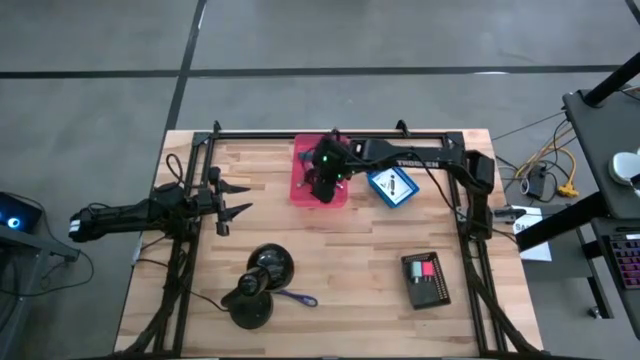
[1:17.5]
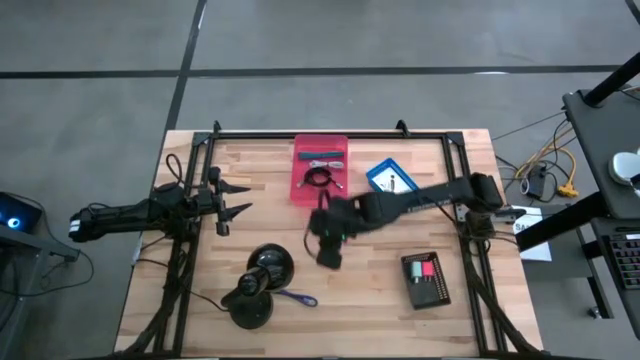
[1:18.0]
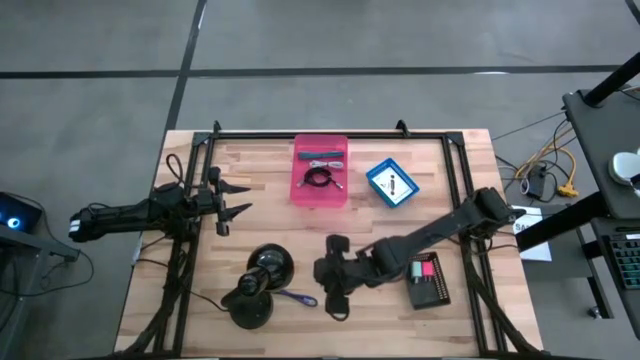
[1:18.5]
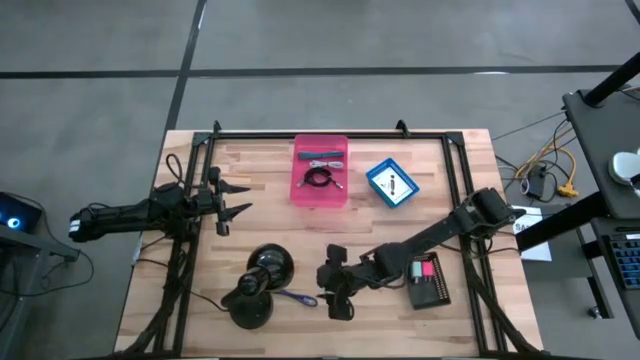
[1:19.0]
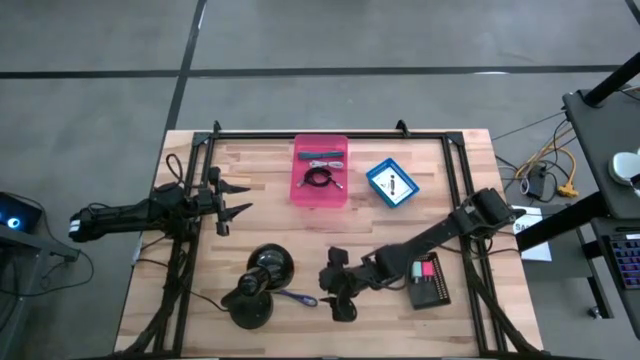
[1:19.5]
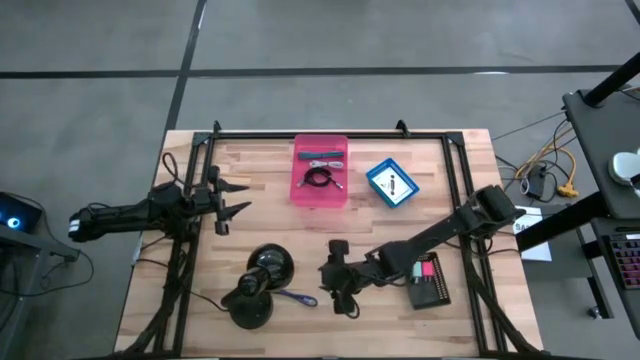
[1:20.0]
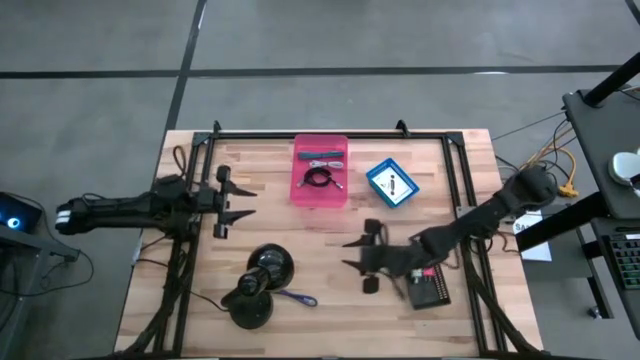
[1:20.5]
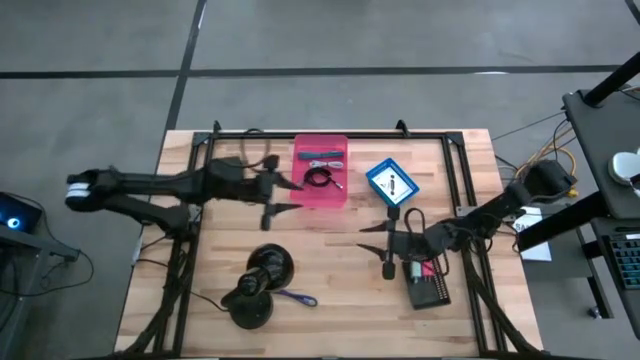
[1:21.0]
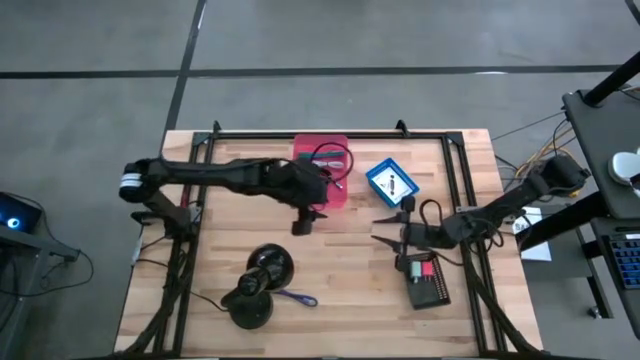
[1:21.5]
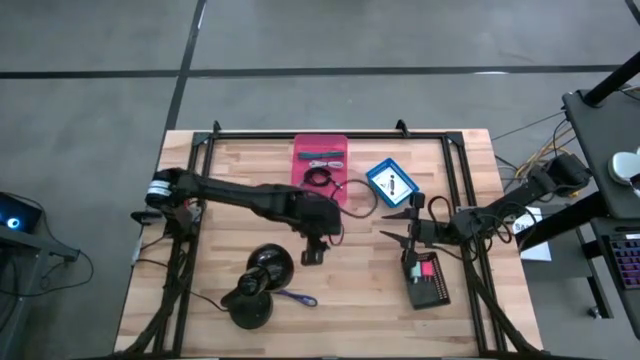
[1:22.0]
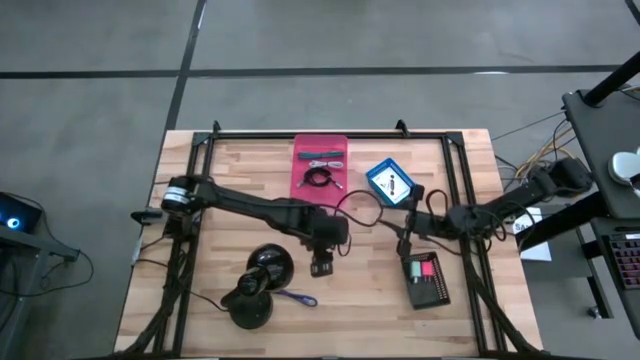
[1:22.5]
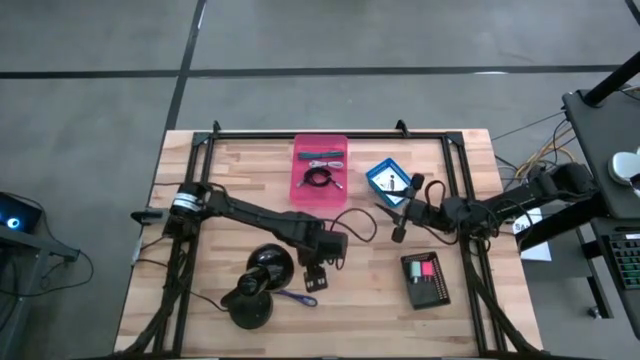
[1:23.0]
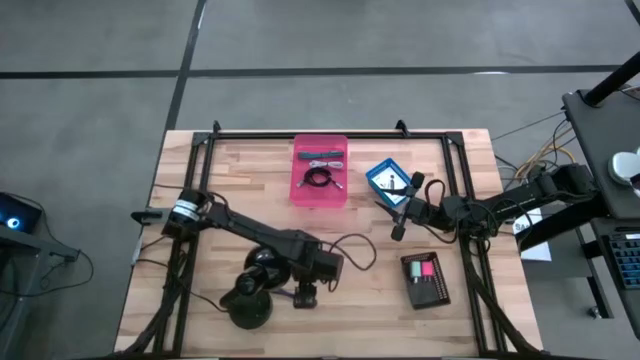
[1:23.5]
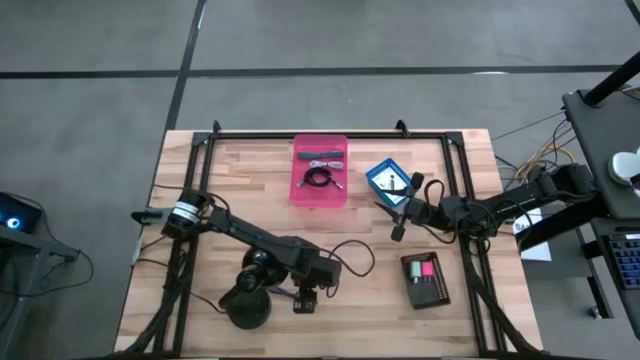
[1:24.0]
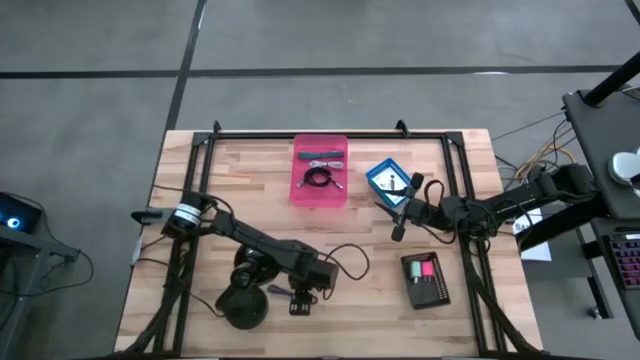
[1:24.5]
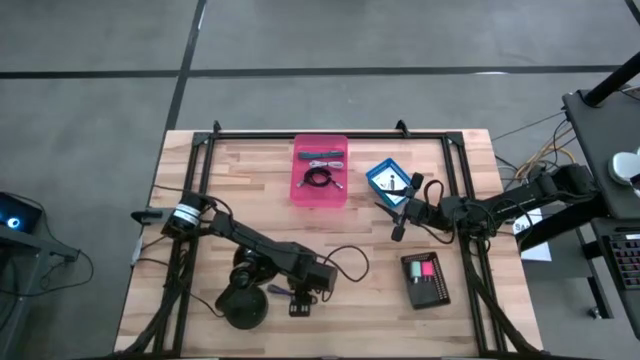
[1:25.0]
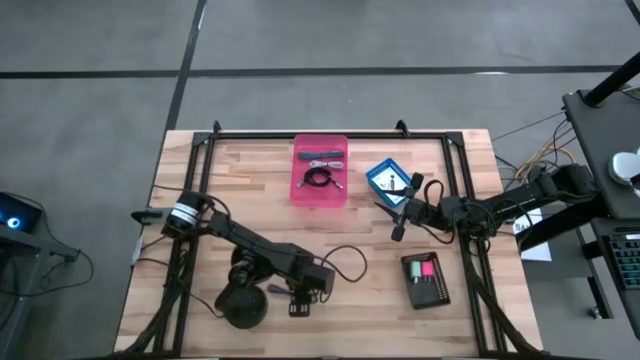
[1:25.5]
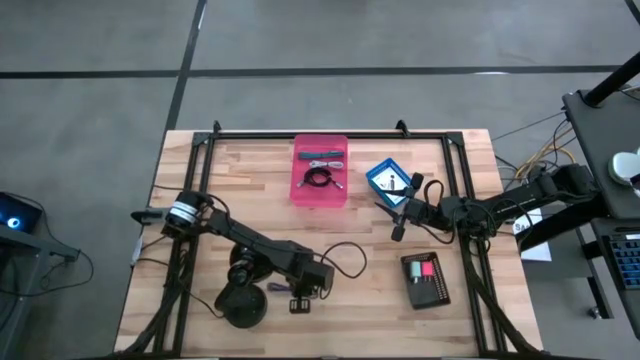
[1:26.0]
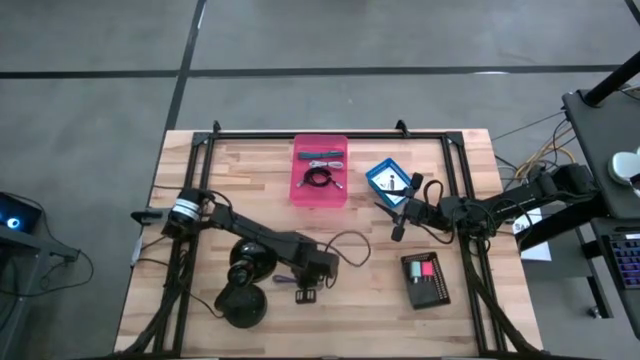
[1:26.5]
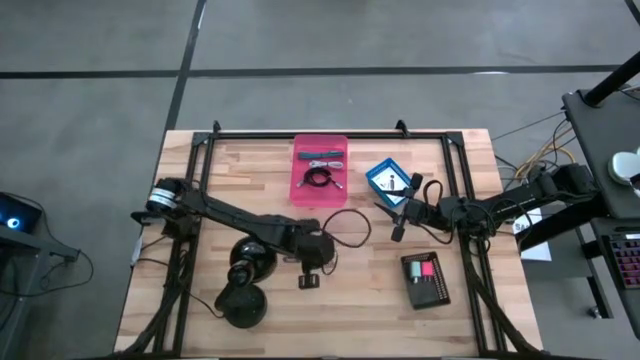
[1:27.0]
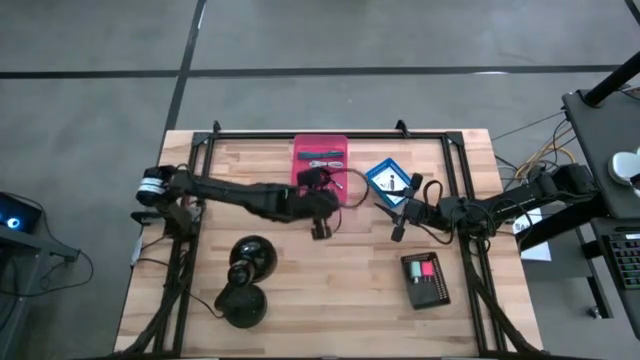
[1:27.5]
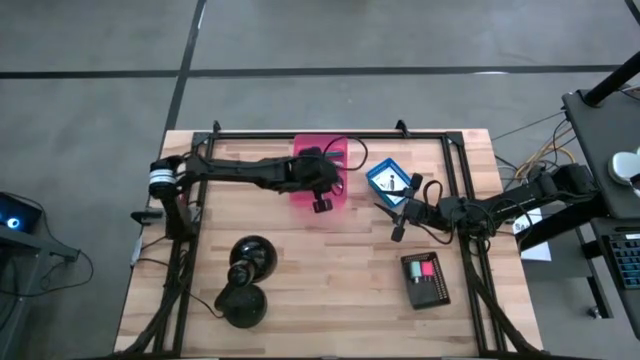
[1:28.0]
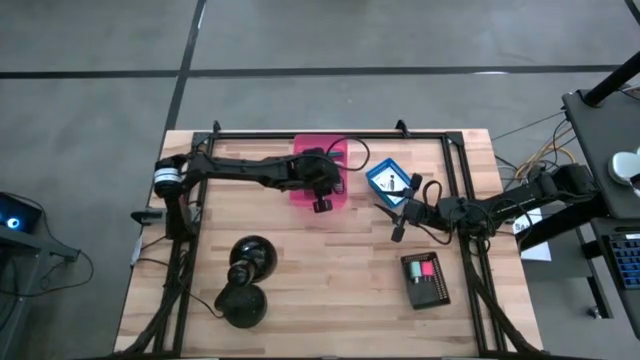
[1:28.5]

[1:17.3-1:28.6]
Task: Pick and place items into bin
Put the blue charger cable into the pink bin

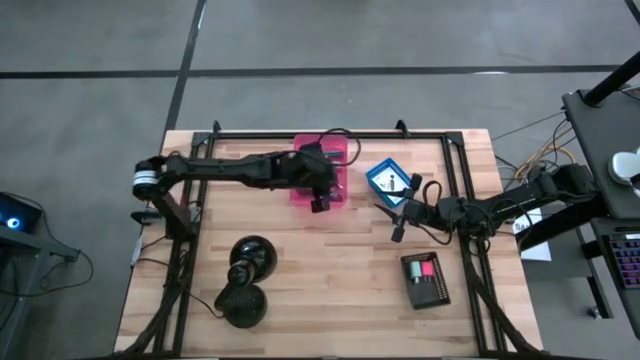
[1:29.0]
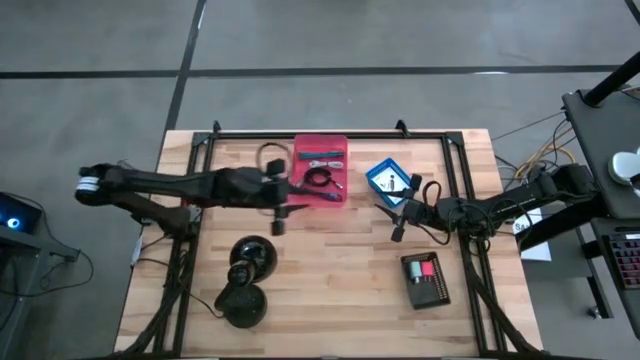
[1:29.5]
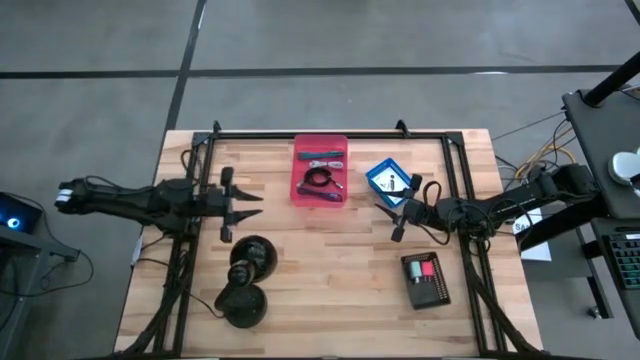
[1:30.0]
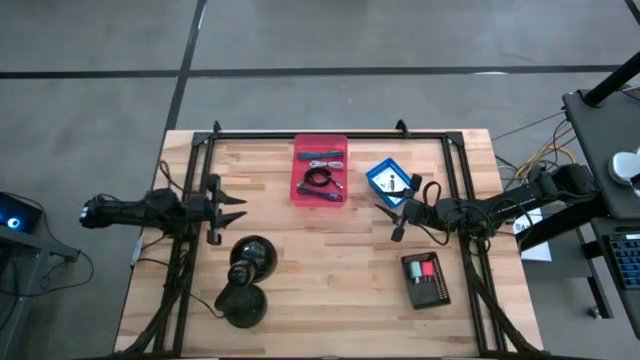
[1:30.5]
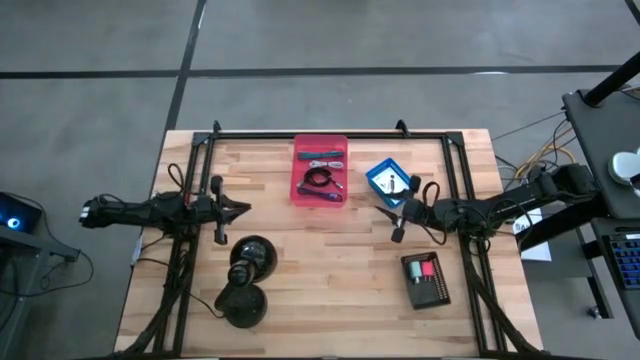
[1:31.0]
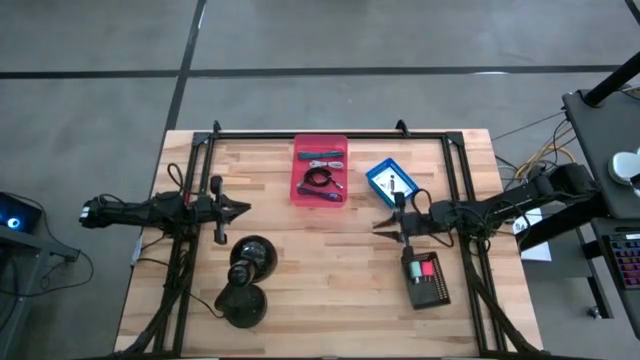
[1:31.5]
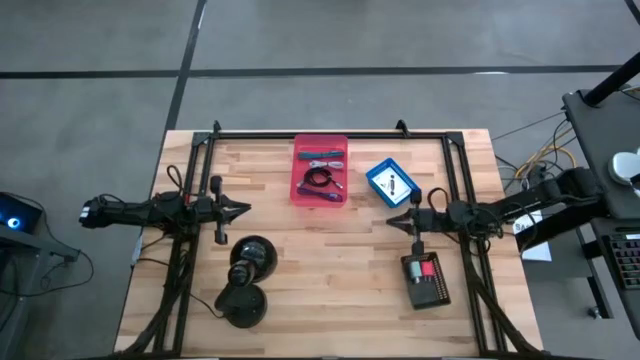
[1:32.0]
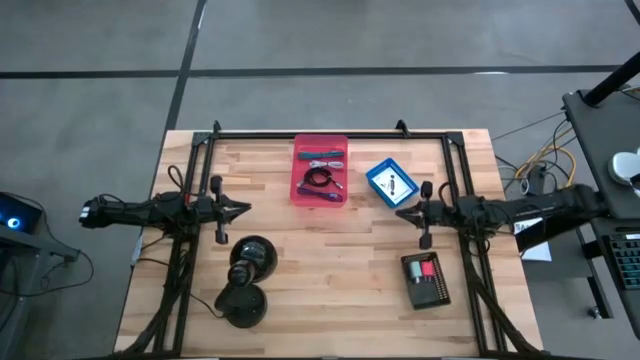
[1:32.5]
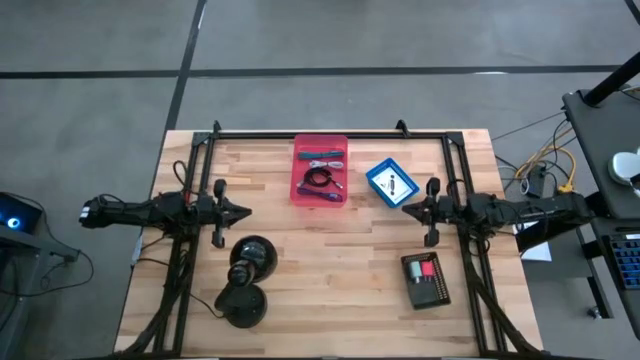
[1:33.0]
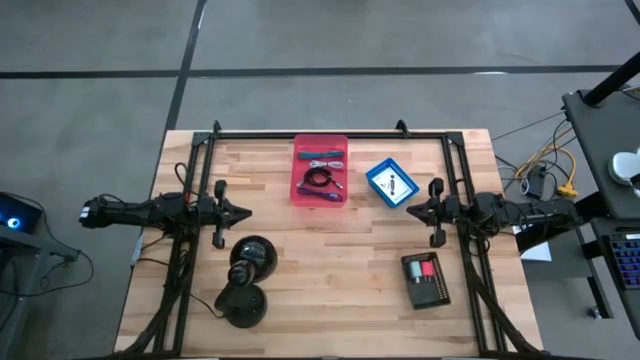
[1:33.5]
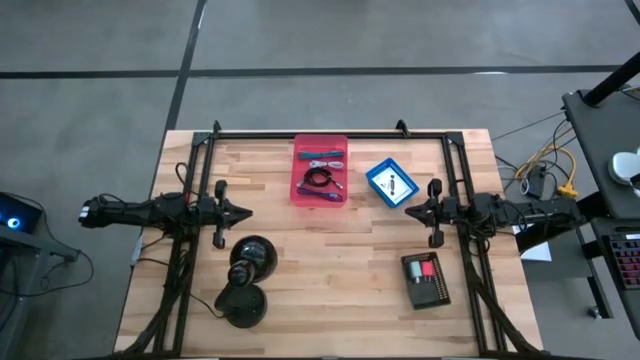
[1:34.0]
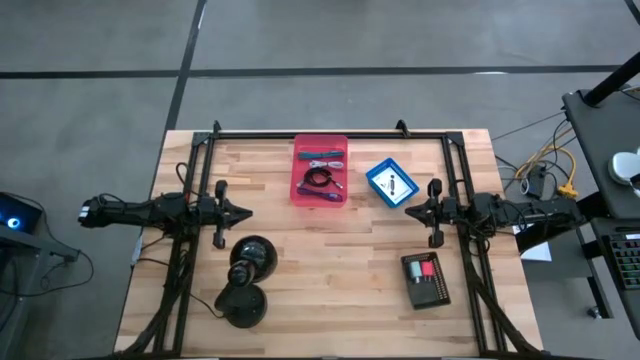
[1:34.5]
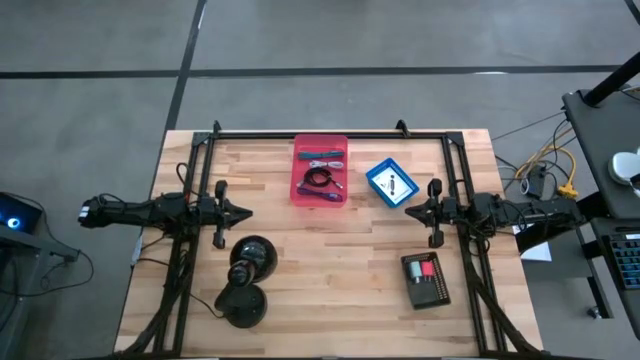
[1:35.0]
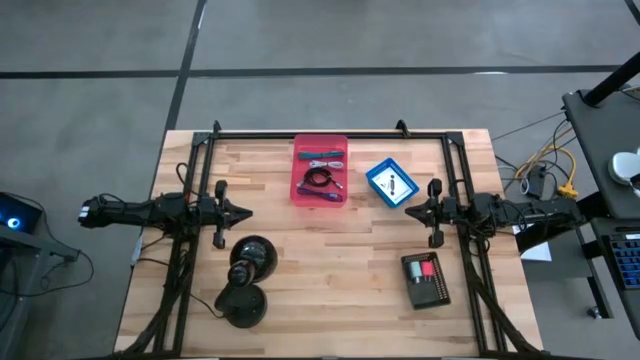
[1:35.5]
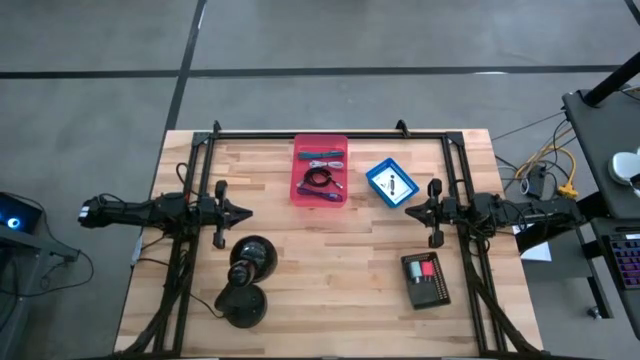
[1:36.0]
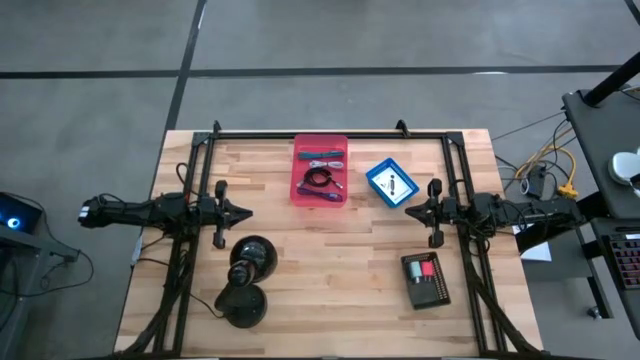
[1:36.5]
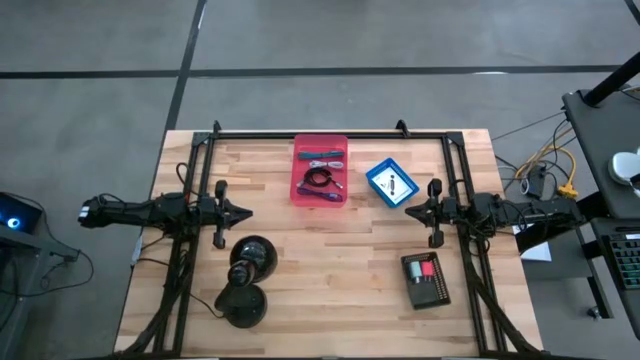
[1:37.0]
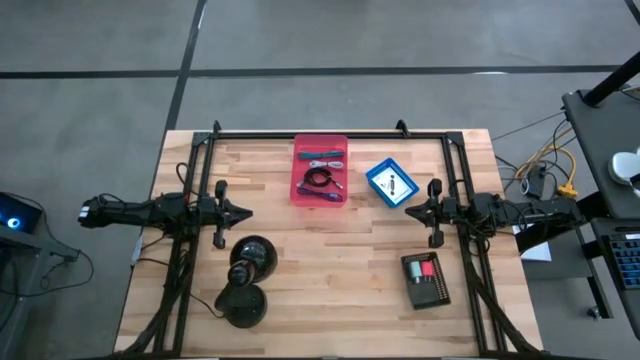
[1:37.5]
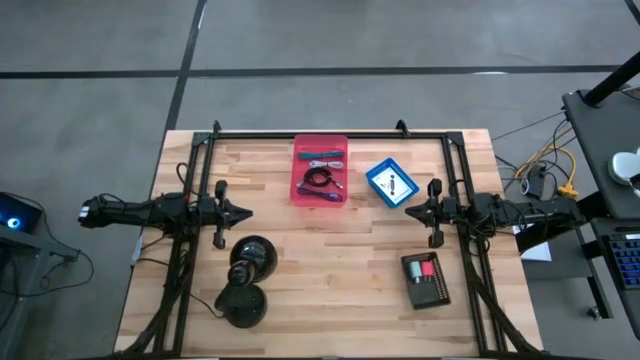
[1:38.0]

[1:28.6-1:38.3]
Return to Home Position
